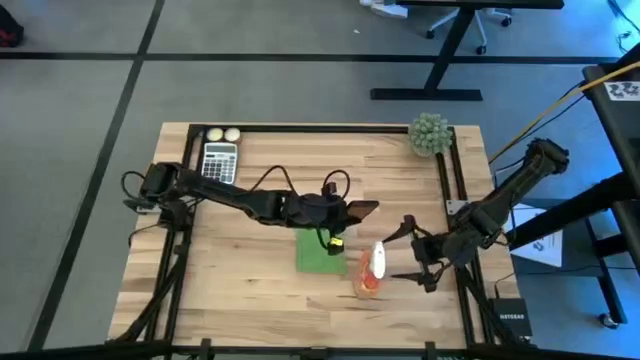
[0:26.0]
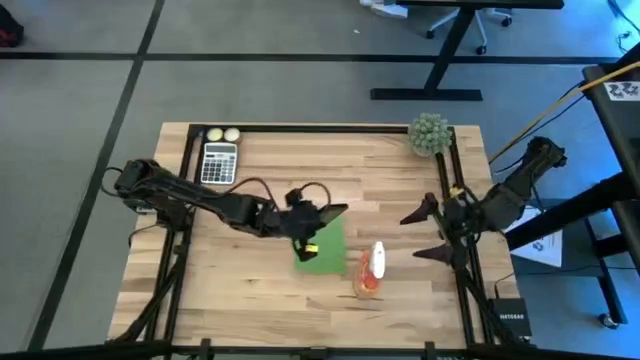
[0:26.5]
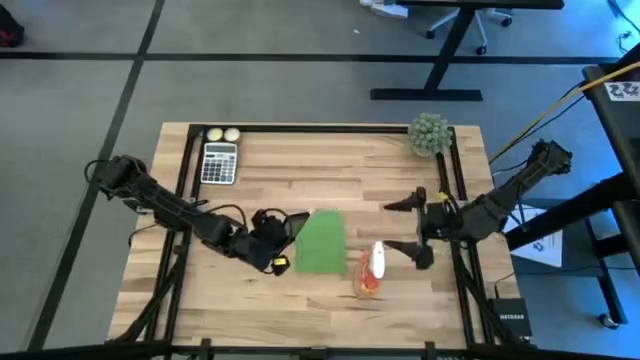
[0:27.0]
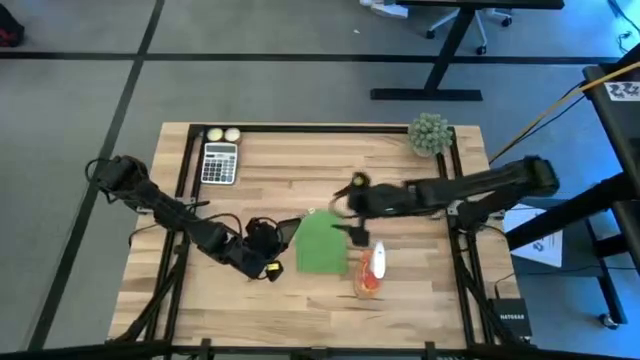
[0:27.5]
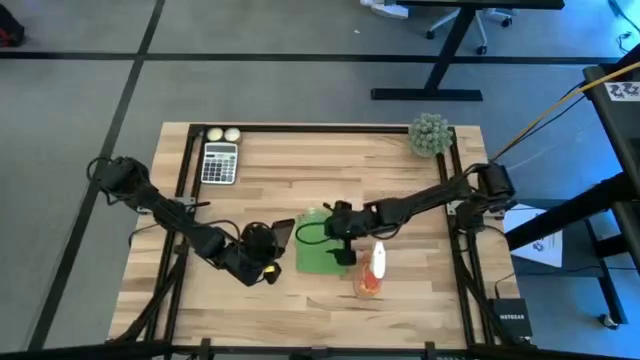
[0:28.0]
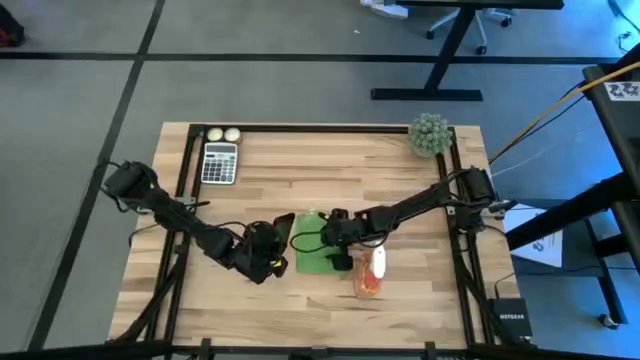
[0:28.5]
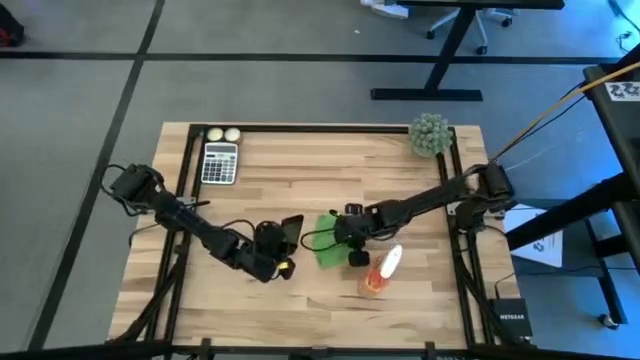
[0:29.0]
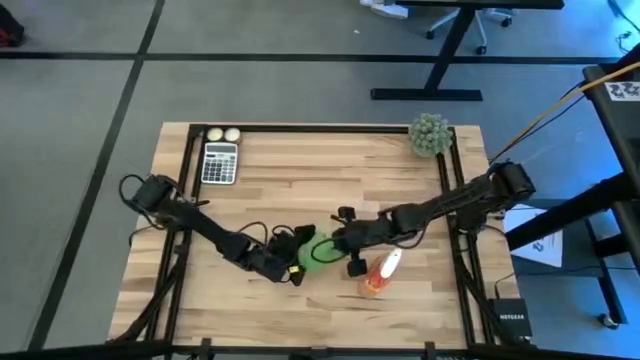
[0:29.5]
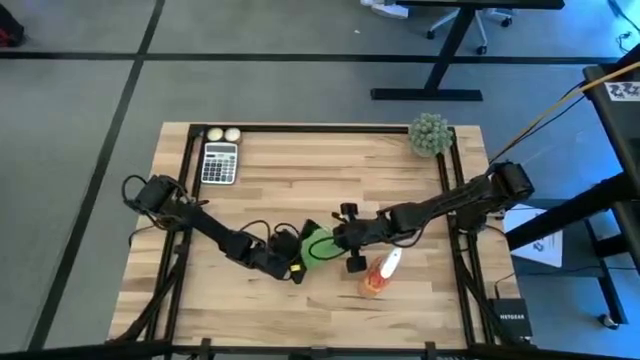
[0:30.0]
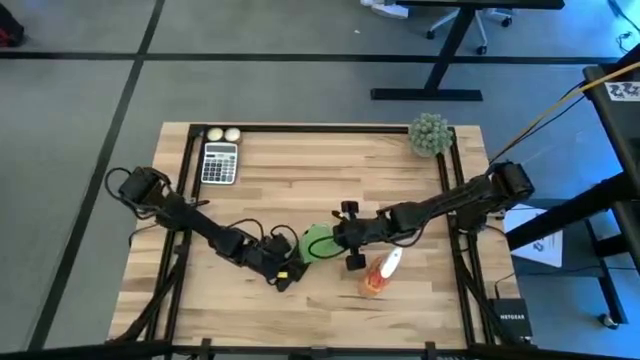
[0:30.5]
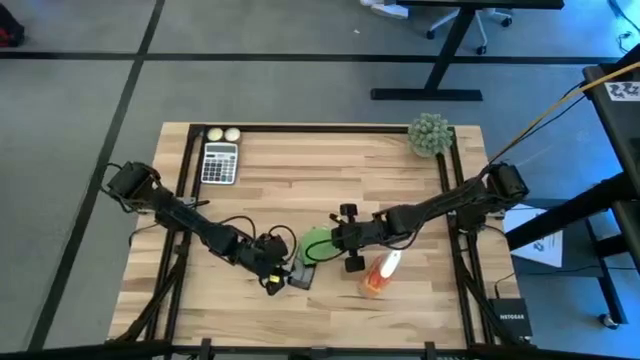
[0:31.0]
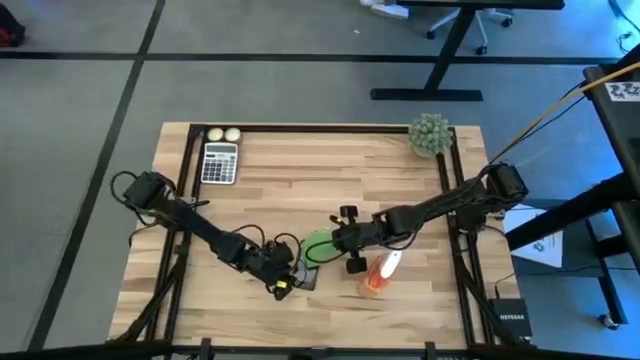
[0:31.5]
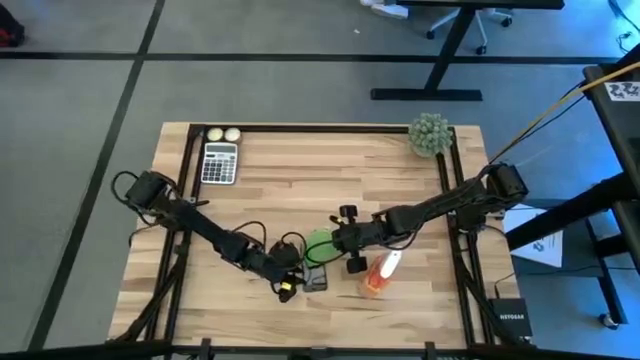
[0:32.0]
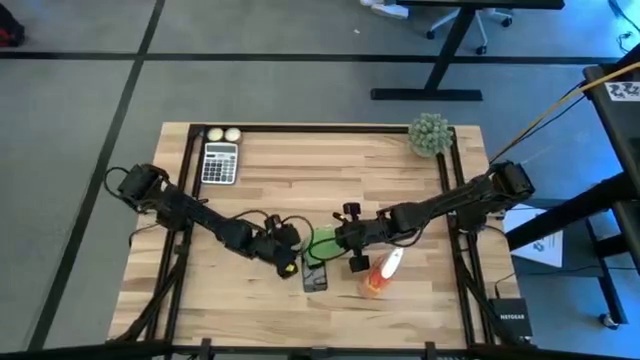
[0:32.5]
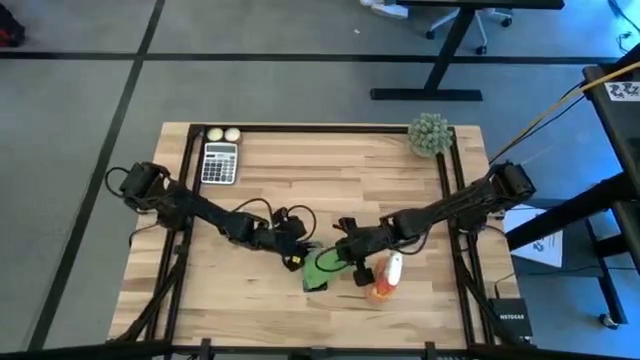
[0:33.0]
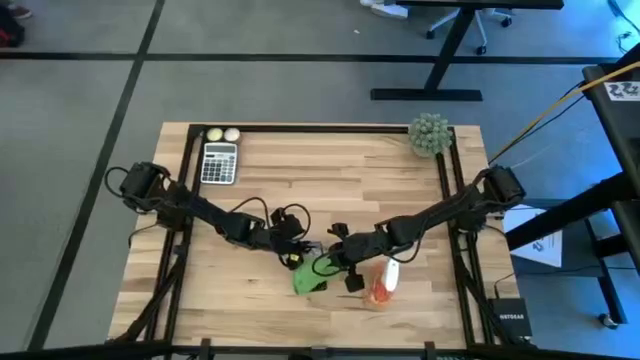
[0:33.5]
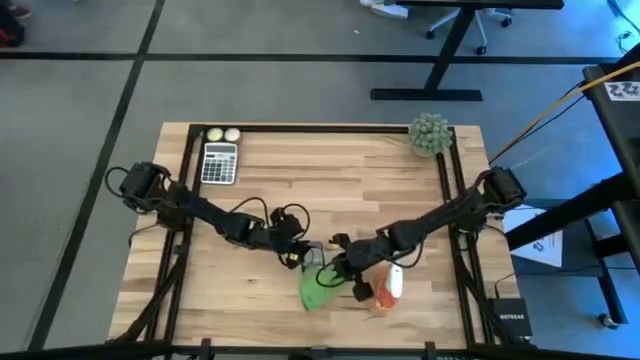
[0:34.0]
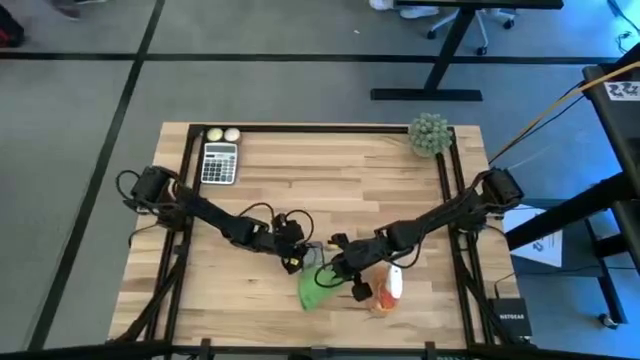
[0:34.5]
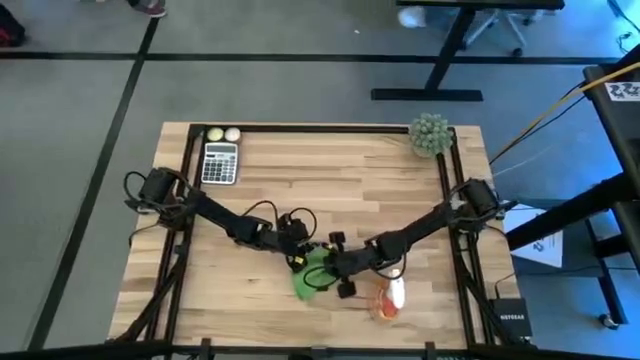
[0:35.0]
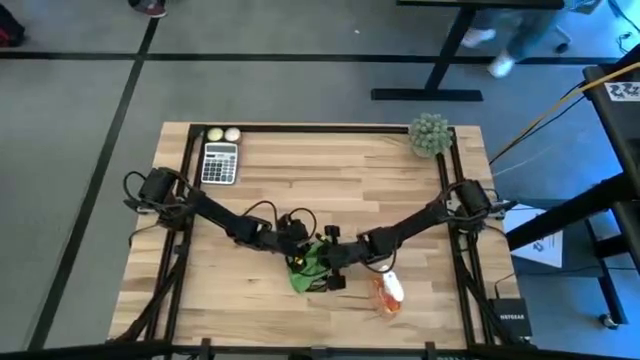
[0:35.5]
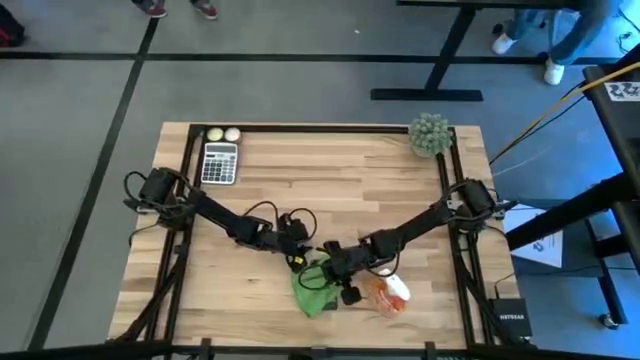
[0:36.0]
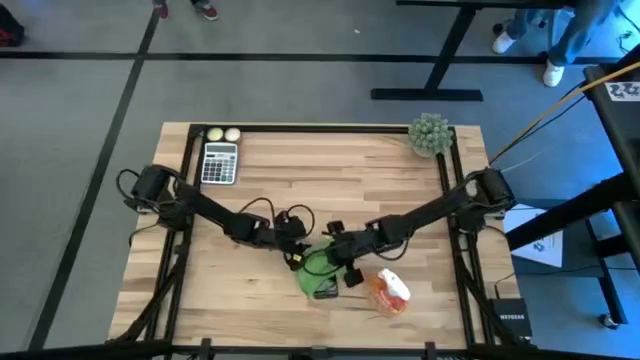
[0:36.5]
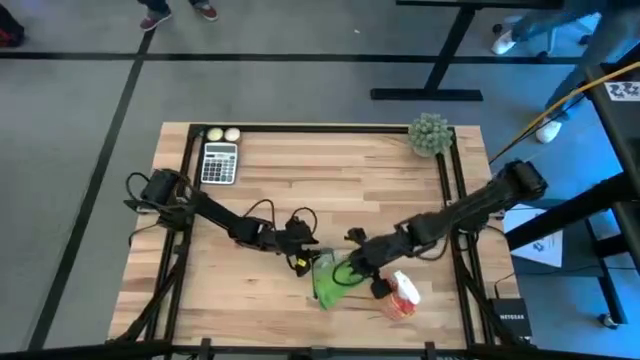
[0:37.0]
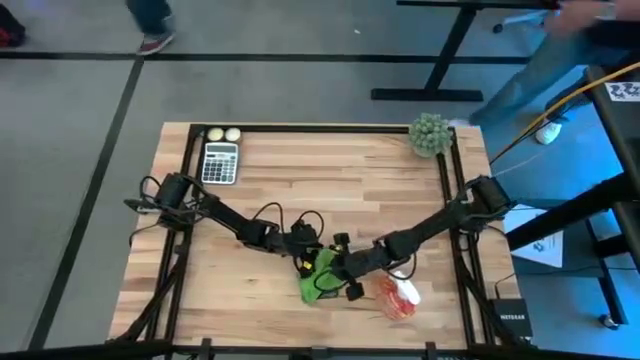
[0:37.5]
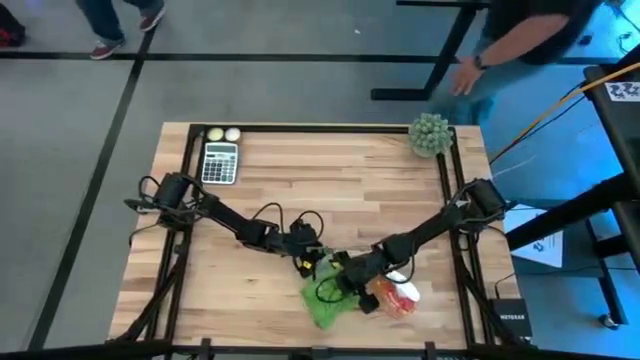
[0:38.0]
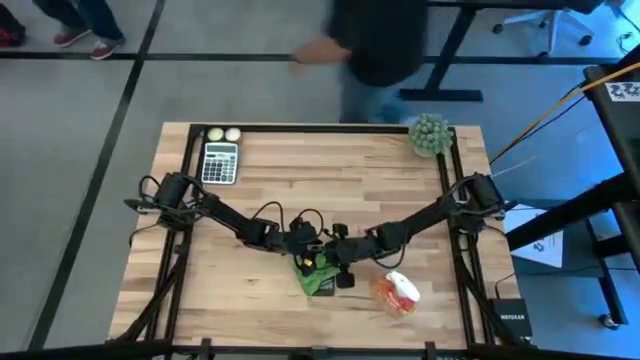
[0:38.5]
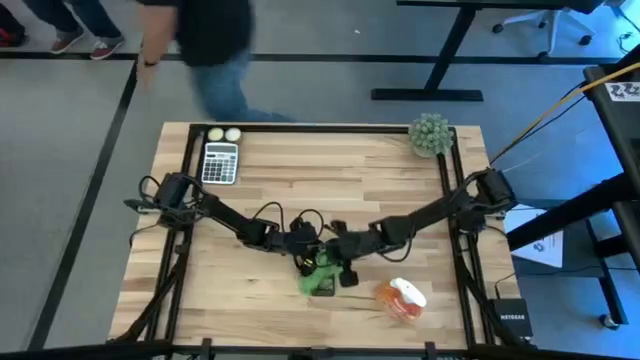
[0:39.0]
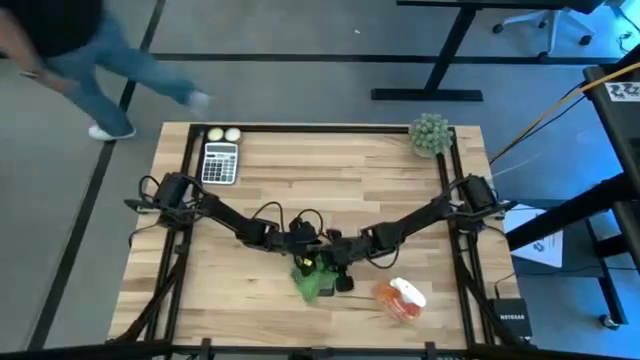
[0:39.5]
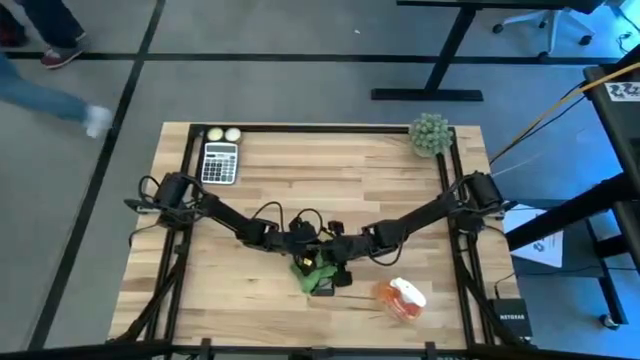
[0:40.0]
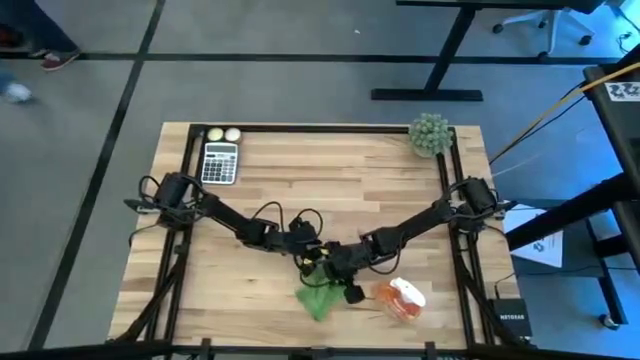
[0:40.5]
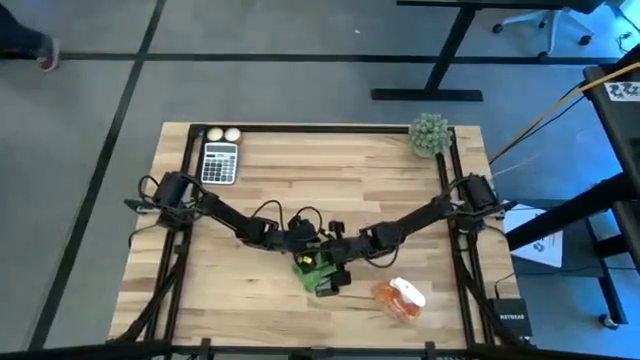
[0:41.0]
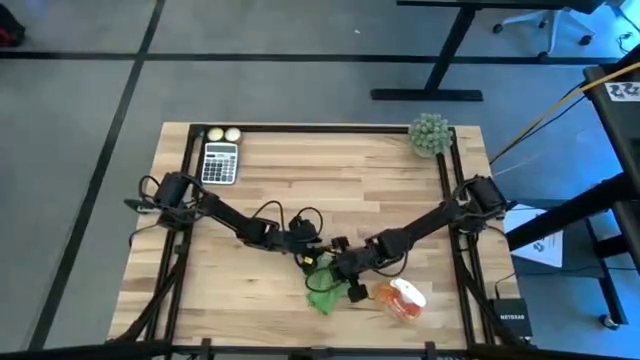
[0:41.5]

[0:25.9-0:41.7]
Task: Apply microfiber cloth
Wipe the front of the black cellphone using the green microfiber cloth

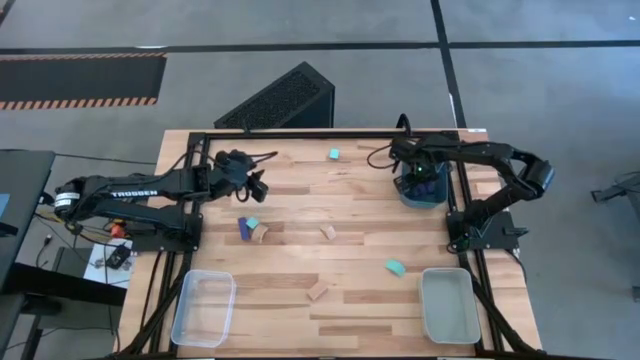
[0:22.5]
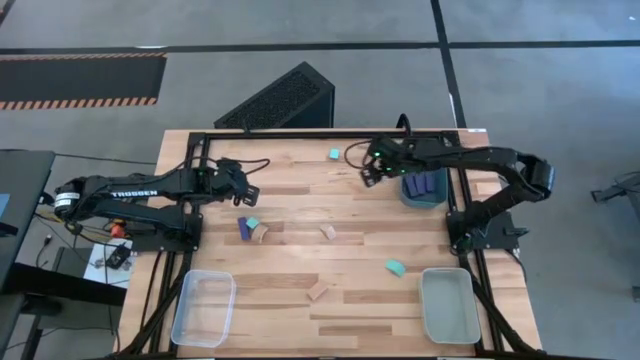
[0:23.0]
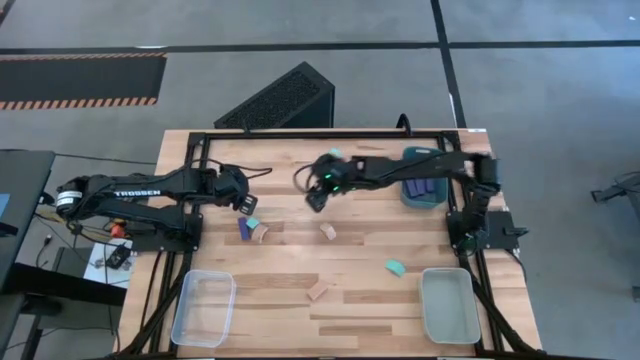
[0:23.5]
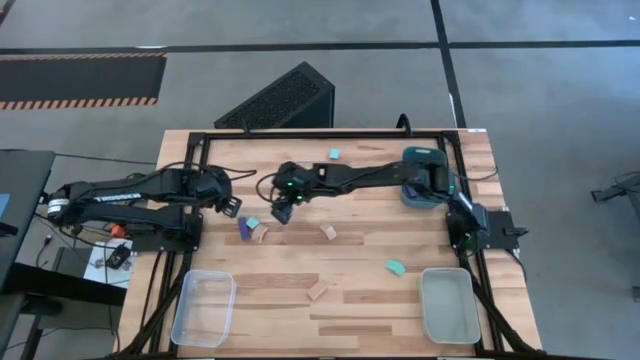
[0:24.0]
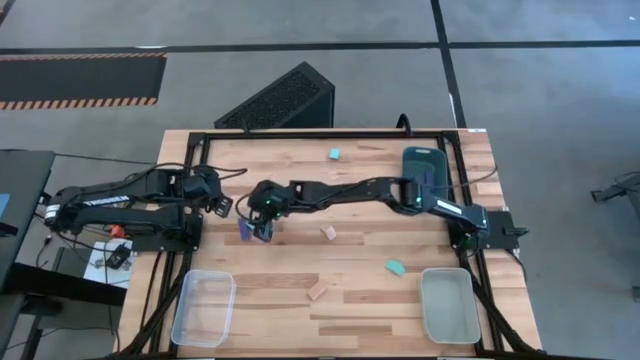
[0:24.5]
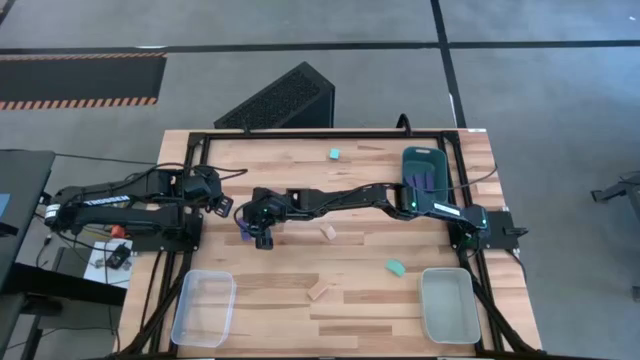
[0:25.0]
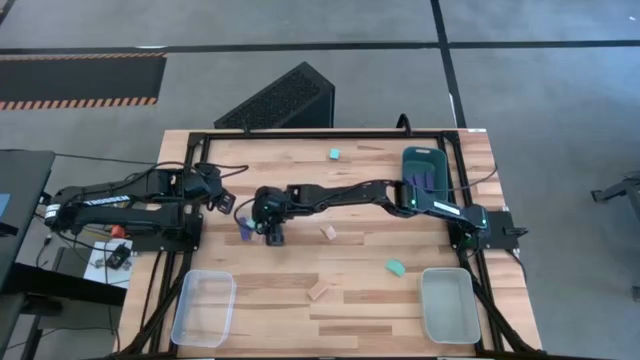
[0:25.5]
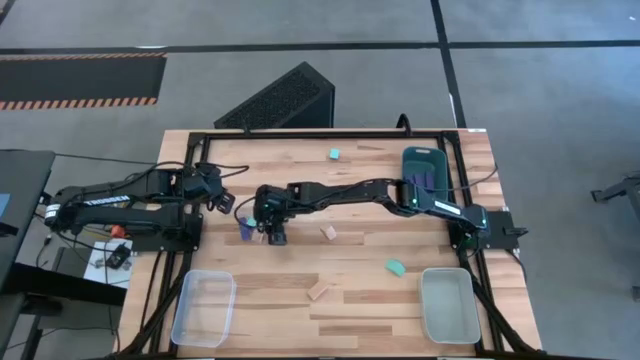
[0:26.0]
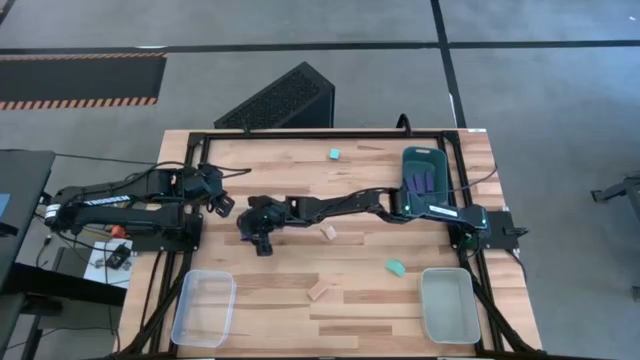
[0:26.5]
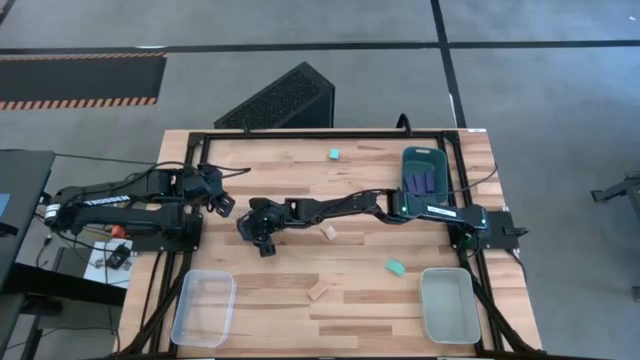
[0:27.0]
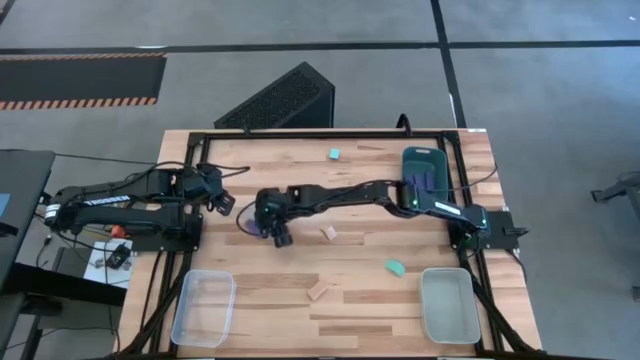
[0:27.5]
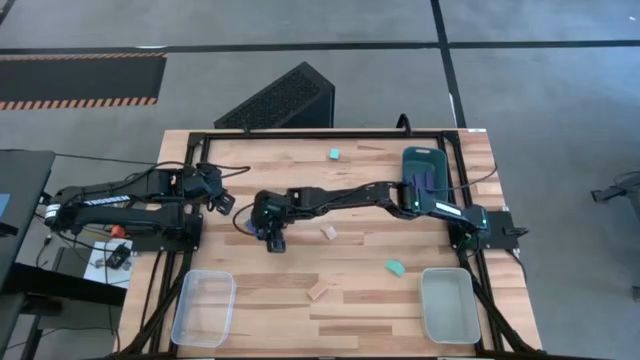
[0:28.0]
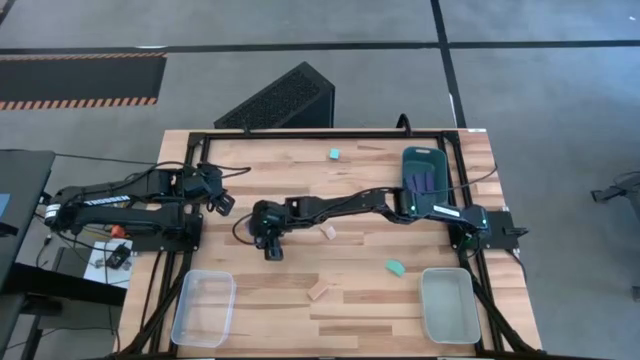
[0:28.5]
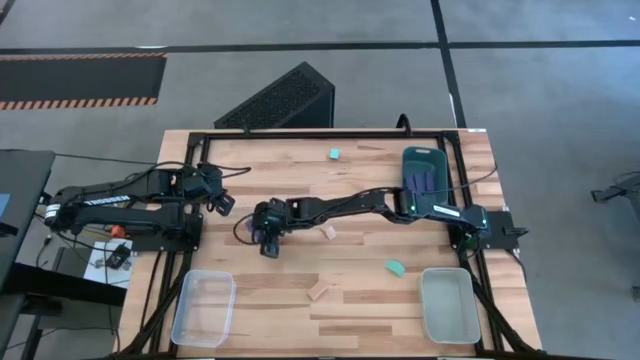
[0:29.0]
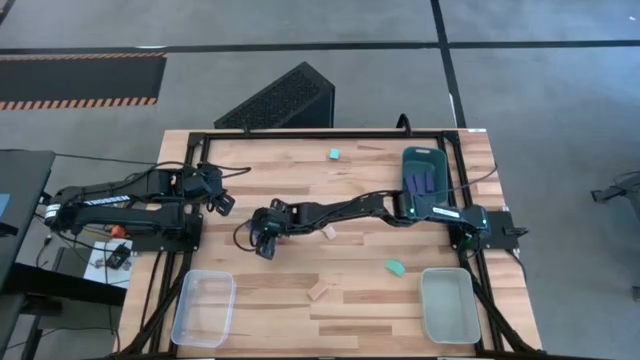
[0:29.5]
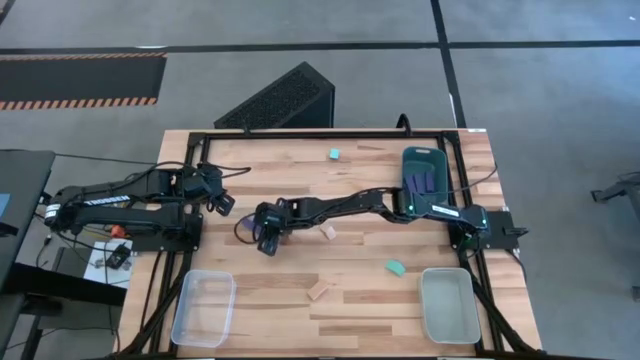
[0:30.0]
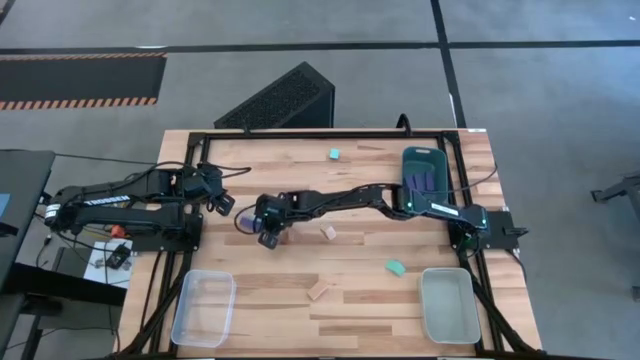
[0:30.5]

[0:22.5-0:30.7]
Task: Sort & place blocks by color
Put the blue block into the green bin
